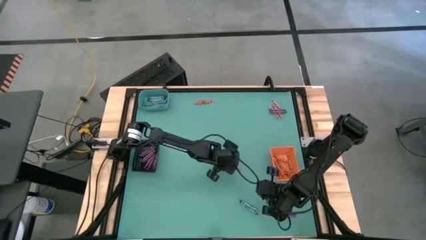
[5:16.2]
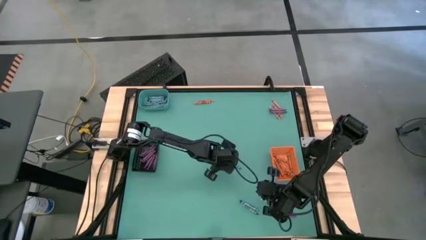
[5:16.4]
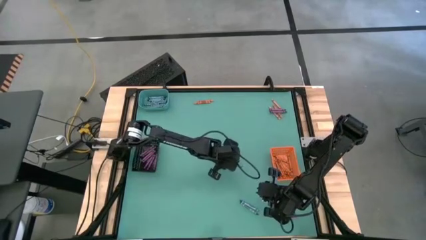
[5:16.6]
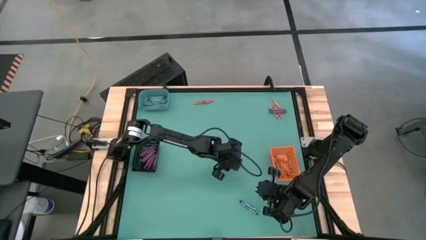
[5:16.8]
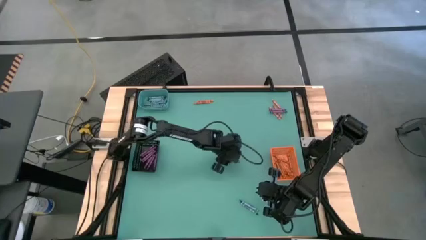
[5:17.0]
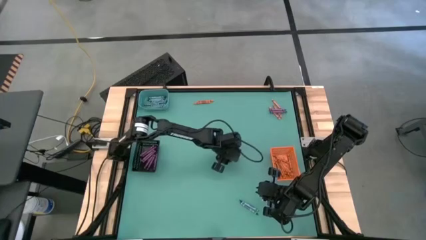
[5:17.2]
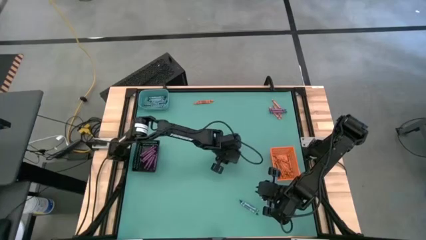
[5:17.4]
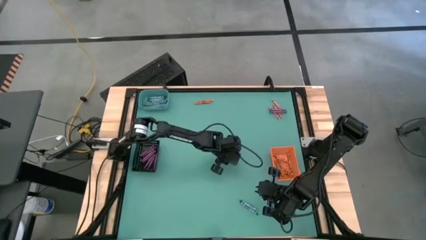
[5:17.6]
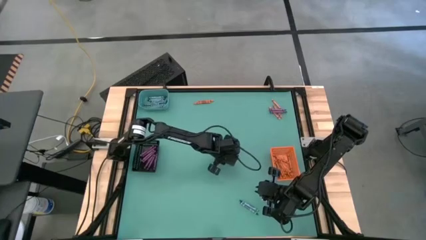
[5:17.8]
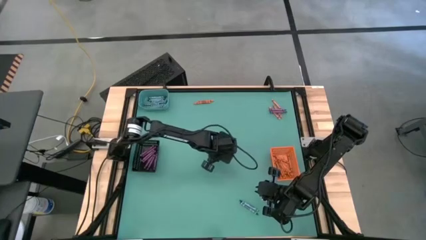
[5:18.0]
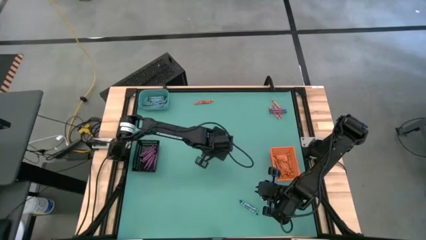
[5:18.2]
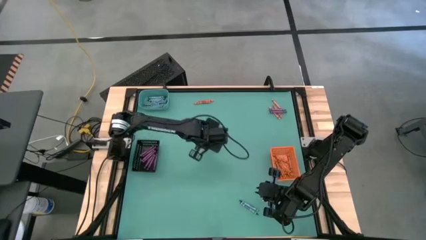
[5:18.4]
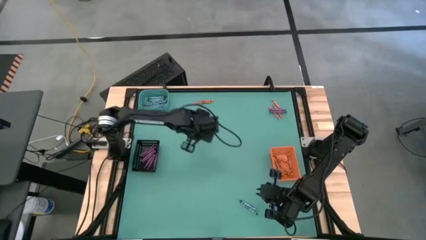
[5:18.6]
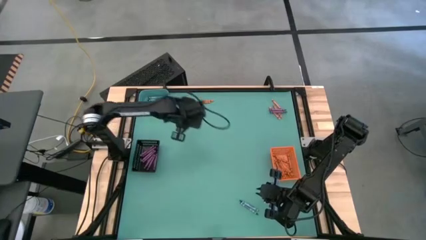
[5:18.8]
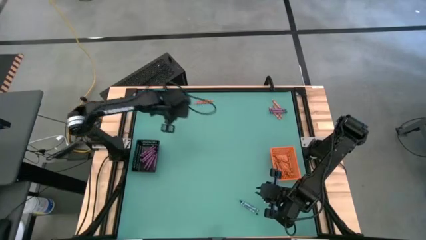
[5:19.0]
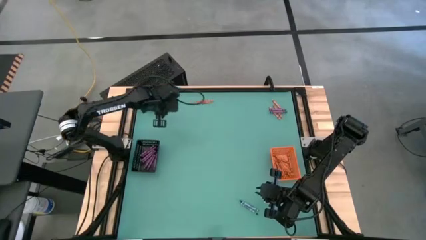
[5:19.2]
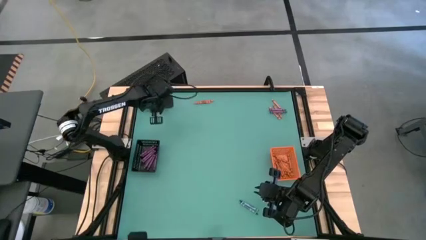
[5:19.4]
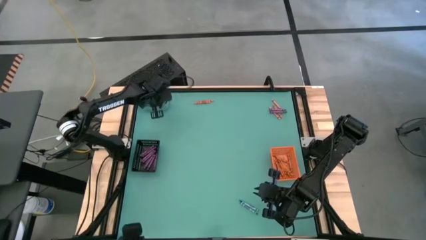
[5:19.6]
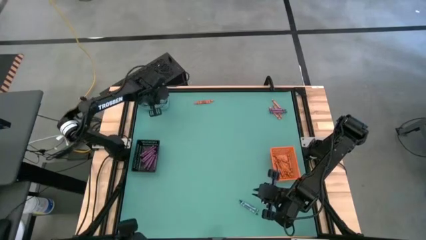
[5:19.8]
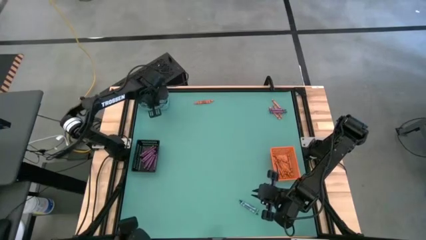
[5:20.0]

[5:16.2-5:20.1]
Task: Sort crayons
Put the green crayon into the green bin

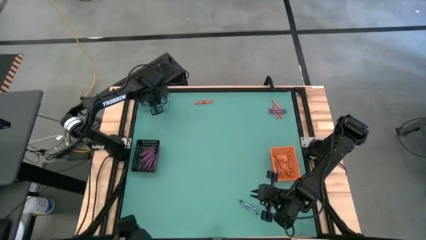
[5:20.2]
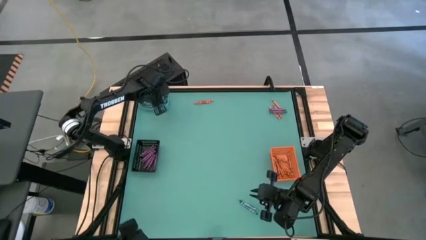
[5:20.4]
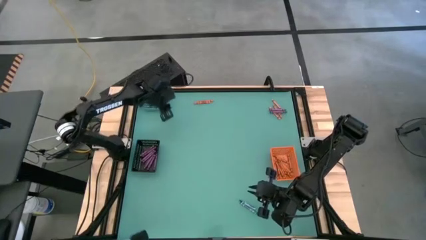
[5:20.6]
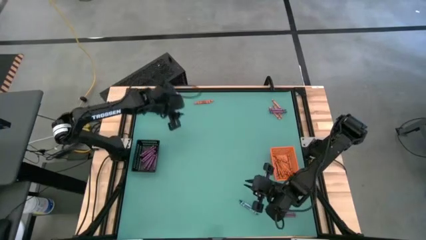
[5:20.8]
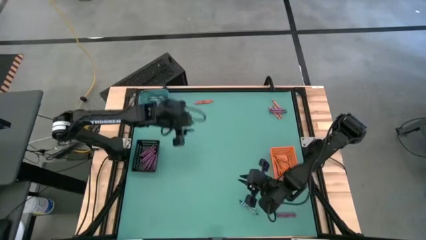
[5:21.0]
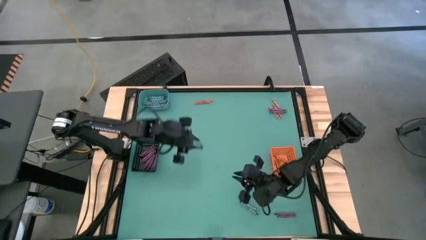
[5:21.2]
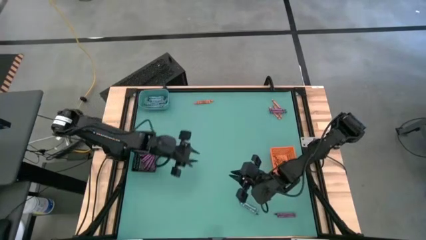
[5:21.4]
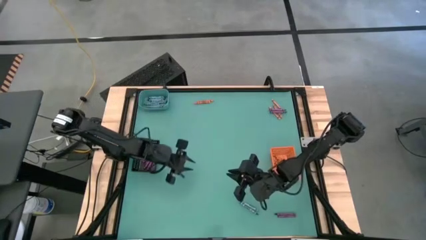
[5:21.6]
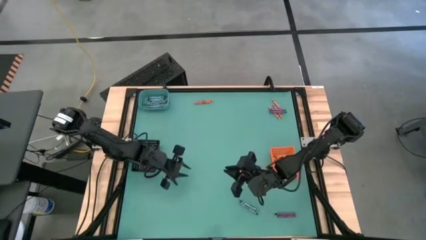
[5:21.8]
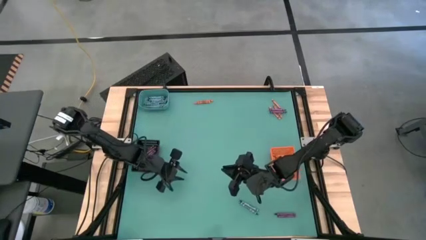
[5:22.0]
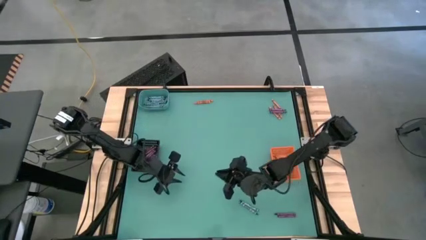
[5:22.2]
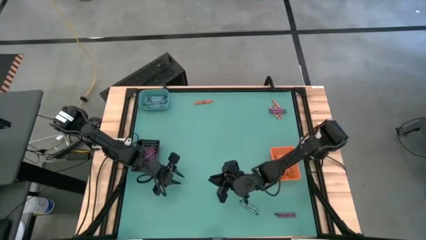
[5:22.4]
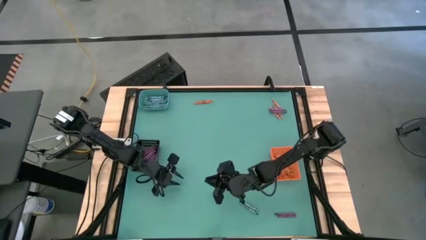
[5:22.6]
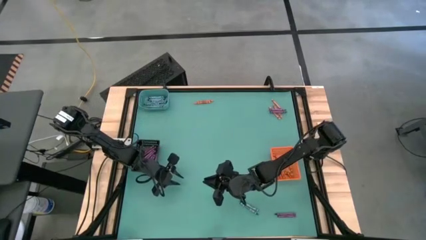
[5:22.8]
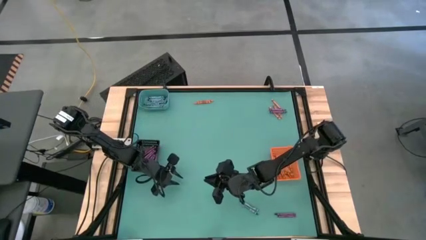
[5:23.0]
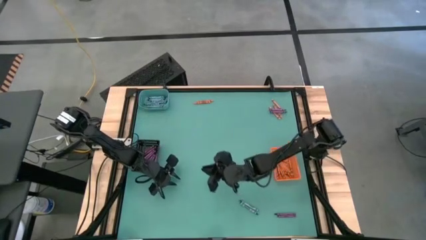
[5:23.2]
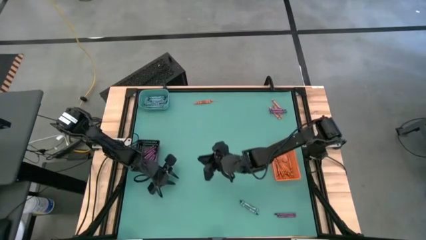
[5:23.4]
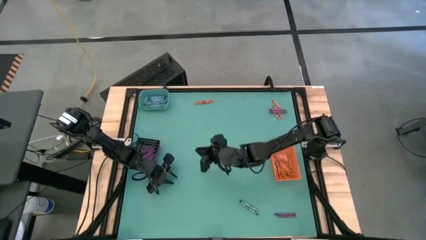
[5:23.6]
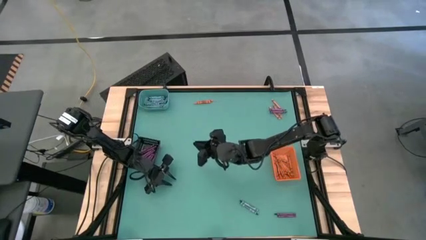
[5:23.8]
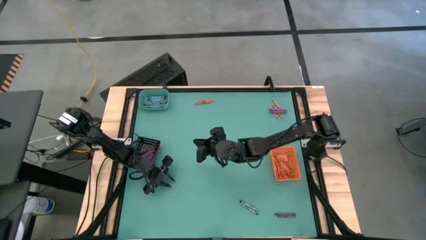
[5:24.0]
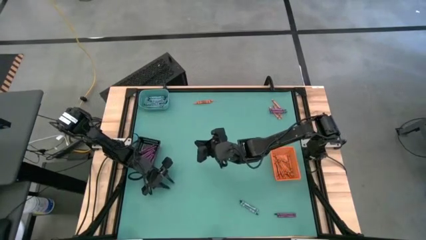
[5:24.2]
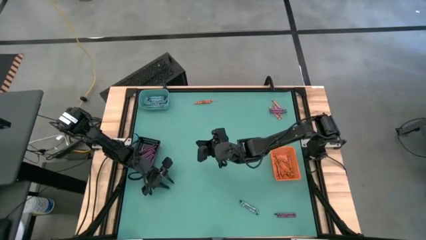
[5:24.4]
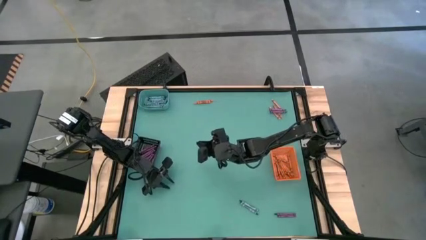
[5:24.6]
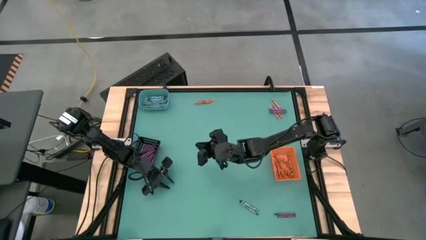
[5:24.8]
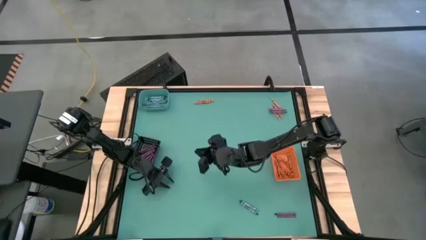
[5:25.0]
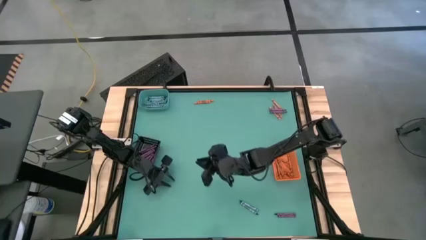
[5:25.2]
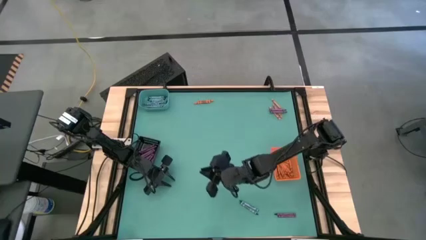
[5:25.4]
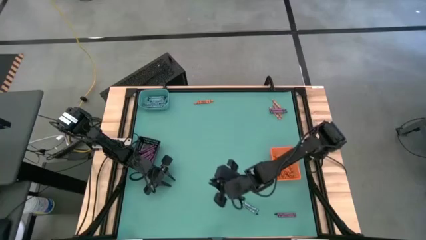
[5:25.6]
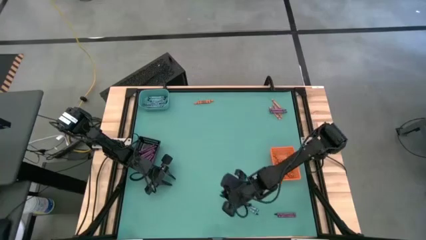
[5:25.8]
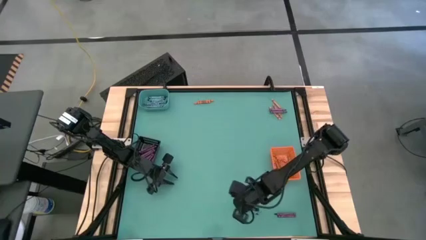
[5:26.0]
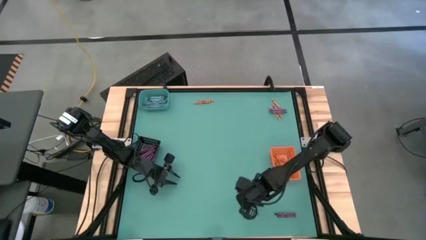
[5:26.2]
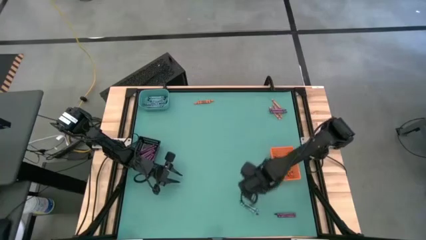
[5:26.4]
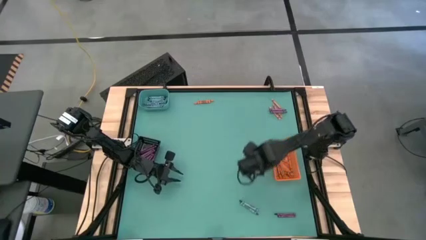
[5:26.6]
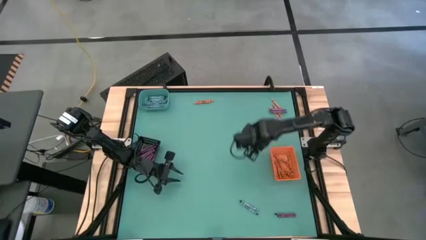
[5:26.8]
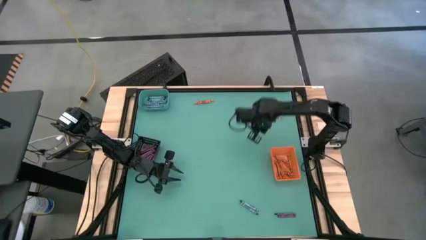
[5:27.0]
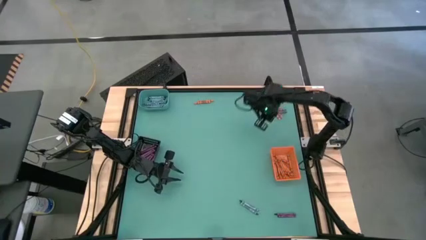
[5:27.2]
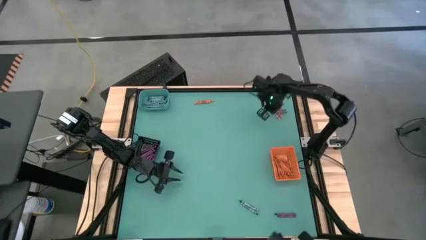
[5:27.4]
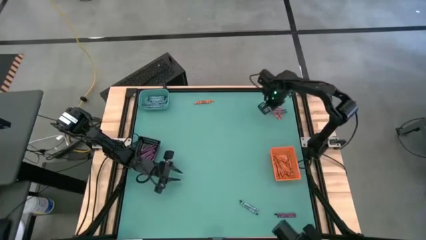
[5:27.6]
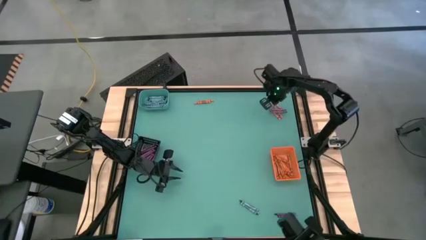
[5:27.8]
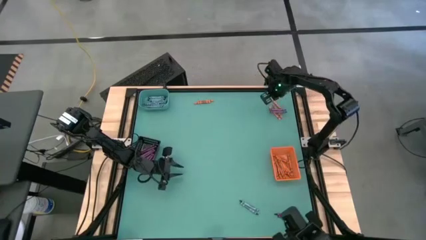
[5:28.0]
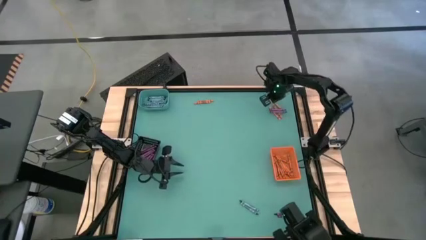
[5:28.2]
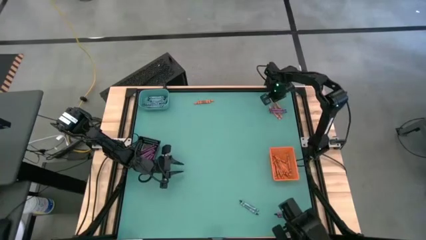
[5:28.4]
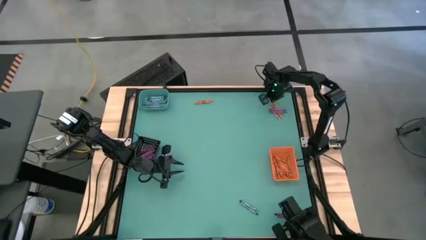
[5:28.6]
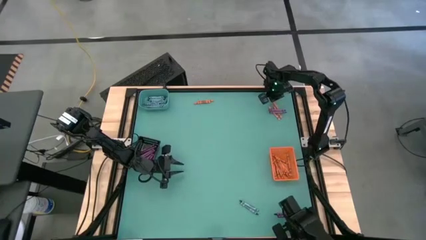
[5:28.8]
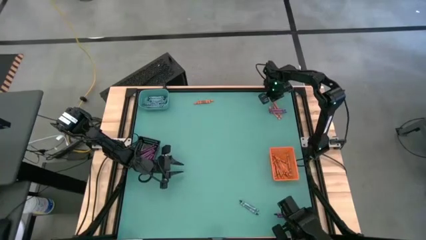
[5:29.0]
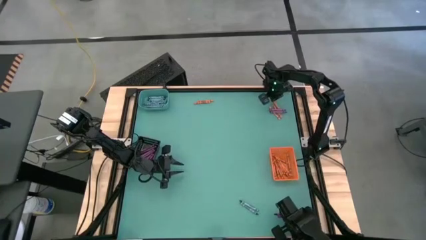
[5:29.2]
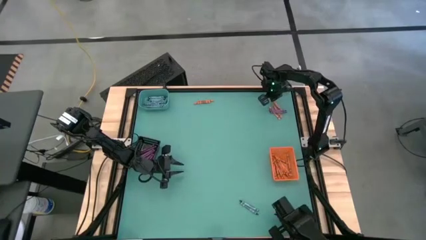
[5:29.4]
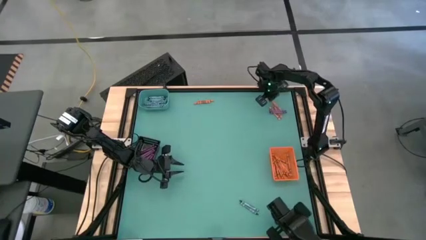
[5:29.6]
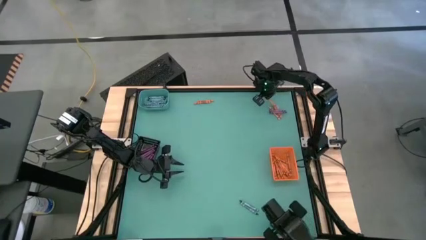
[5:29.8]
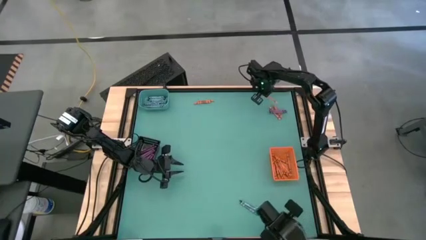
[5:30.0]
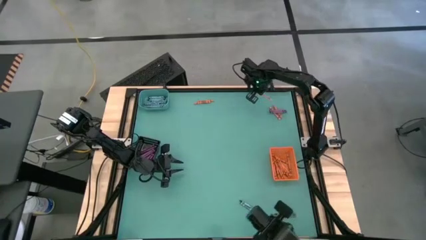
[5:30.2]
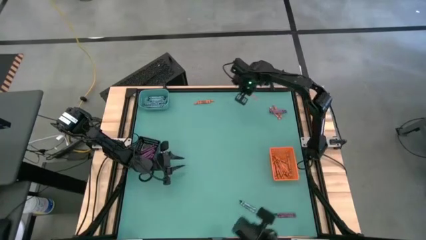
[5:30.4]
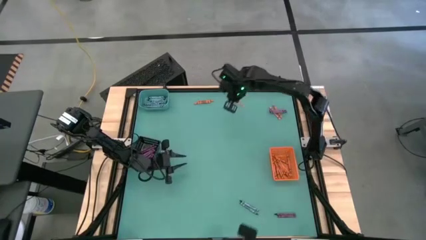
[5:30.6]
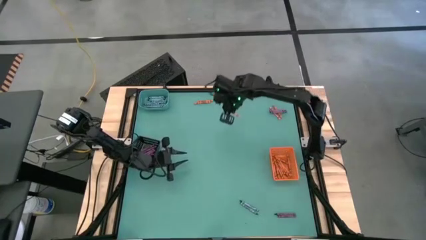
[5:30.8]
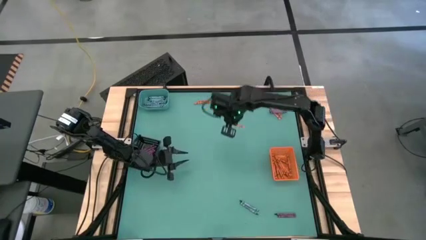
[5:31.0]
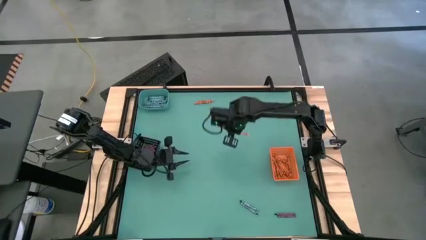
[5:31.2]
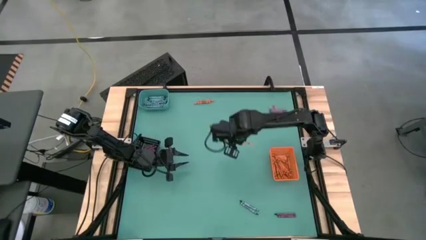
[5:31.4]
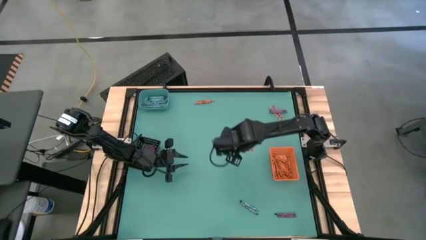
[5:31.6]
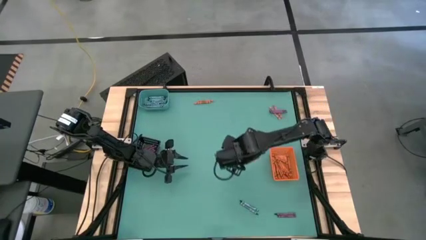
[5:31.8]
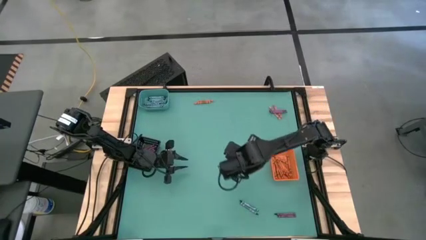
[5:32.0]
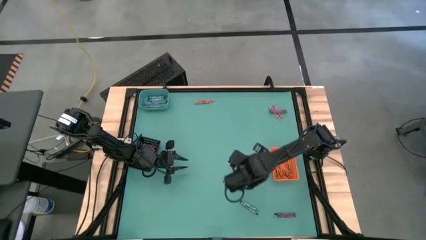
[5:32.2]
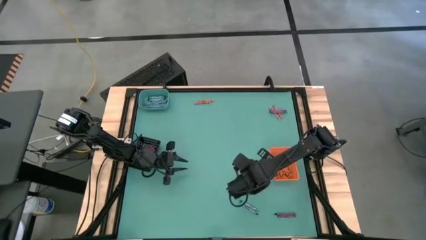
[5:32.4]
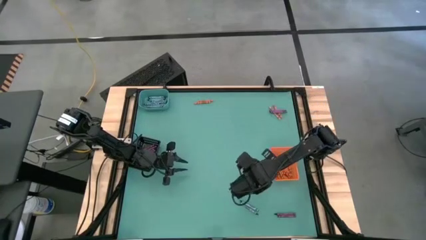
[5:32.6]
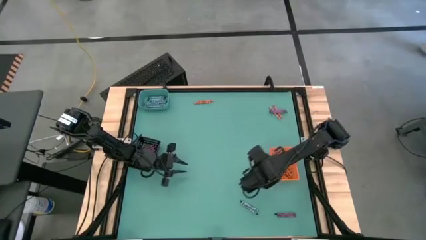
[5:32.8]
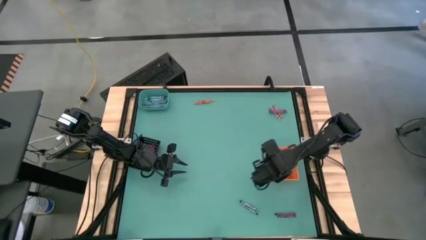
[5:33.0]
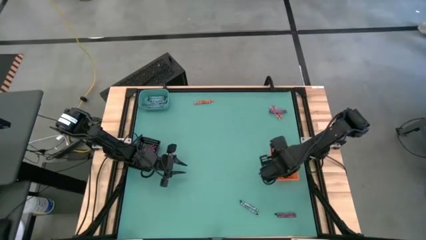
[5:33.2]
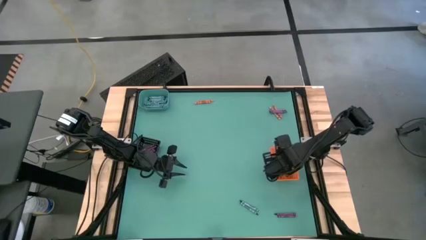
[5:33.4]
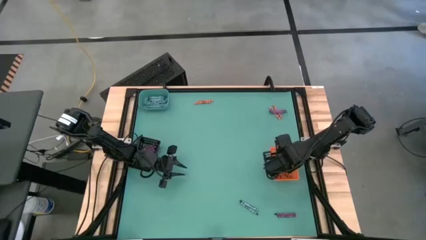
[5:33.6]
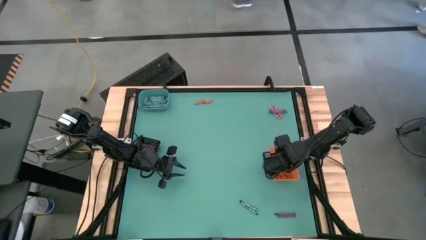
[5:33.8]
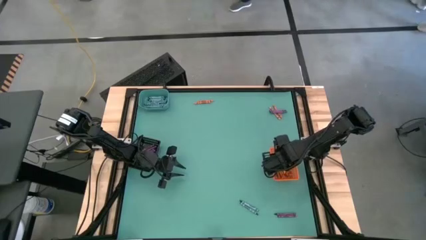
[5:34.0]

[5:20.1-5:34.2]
Put the orange crayon into the orange bin
